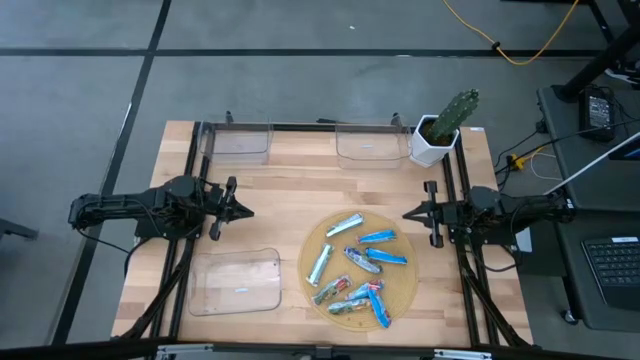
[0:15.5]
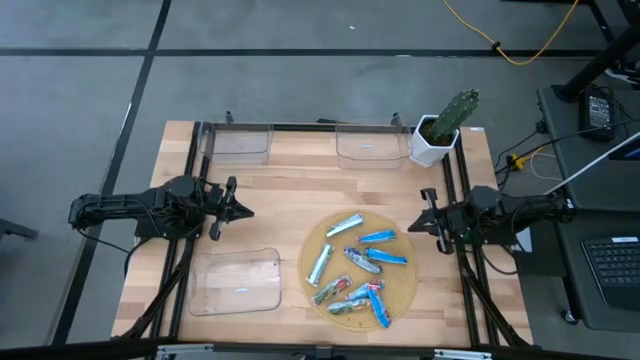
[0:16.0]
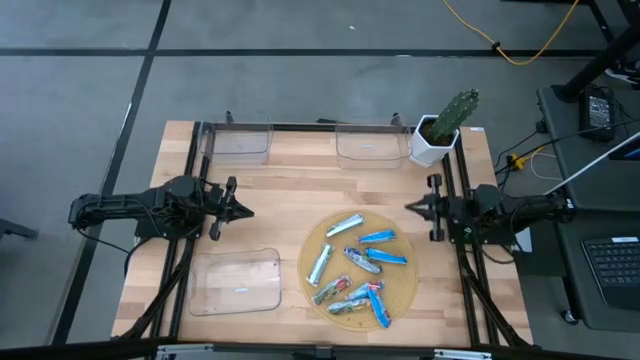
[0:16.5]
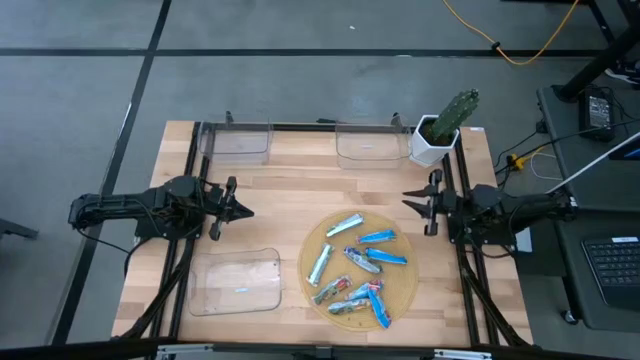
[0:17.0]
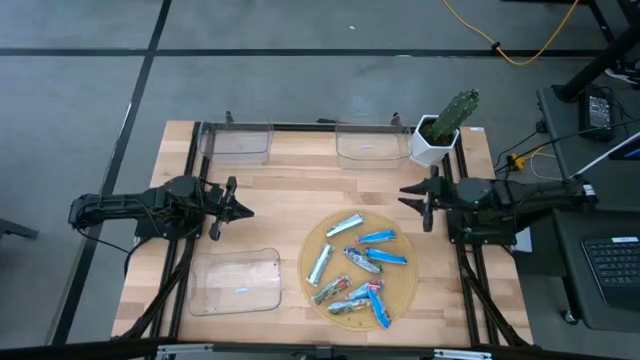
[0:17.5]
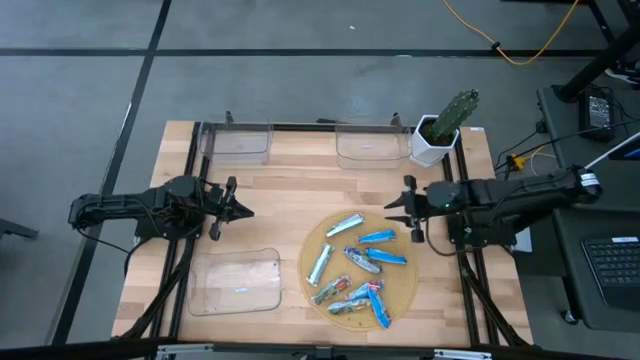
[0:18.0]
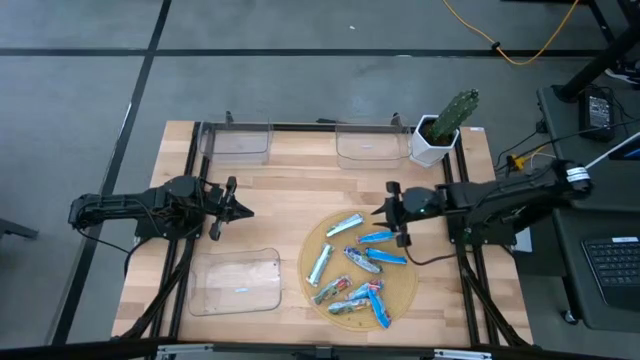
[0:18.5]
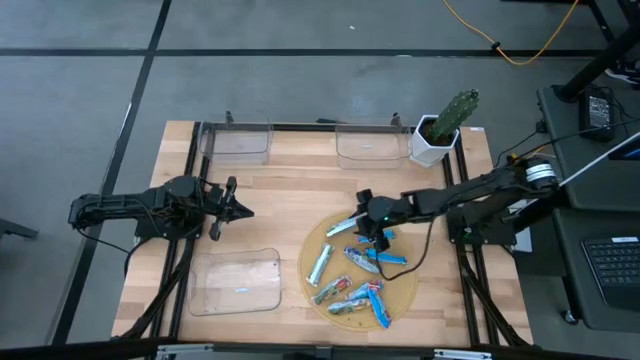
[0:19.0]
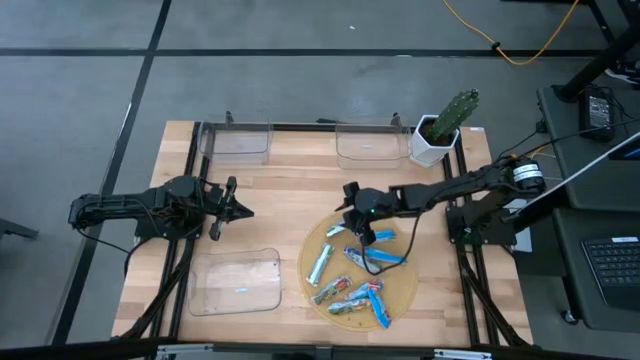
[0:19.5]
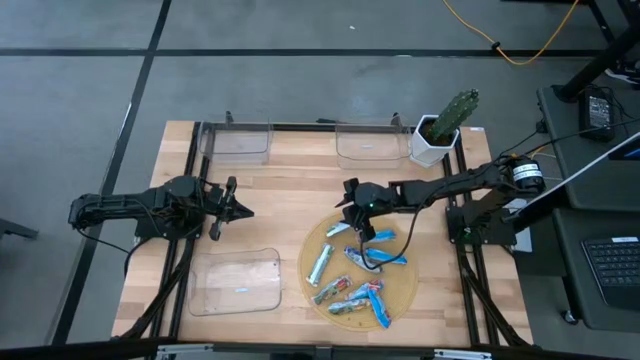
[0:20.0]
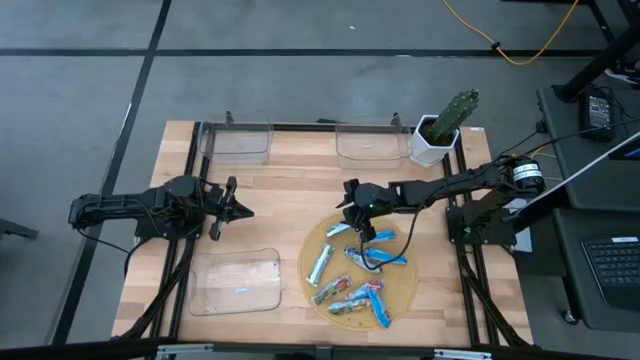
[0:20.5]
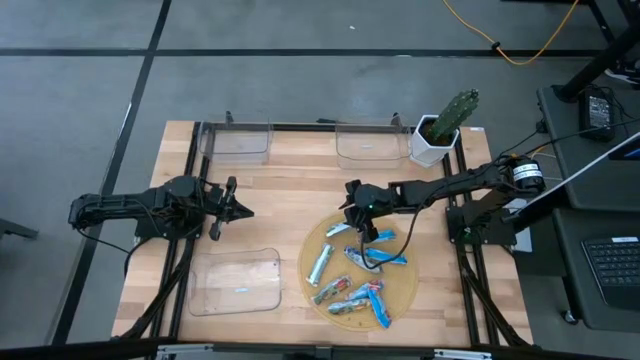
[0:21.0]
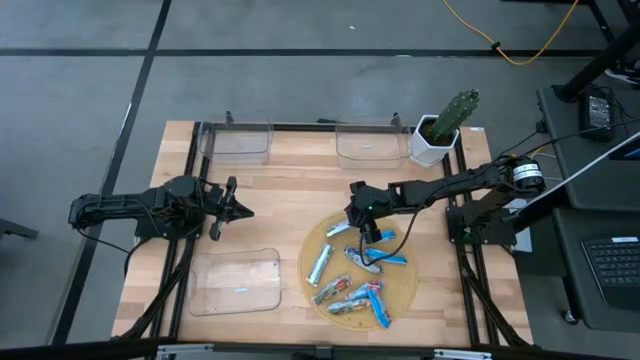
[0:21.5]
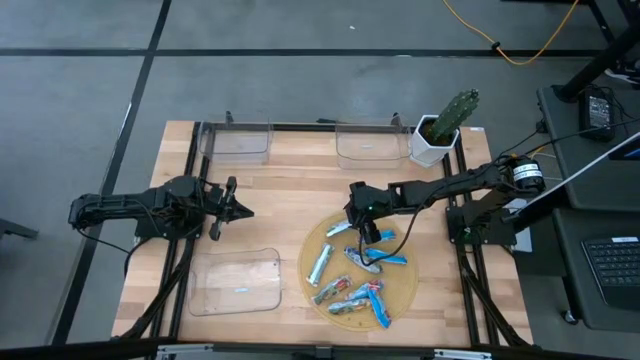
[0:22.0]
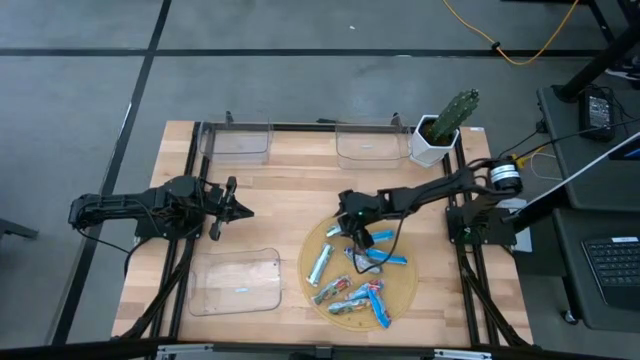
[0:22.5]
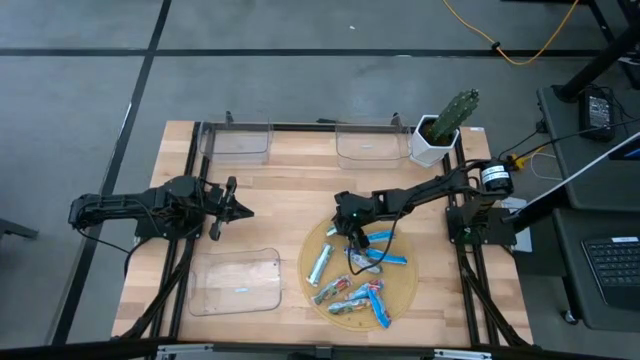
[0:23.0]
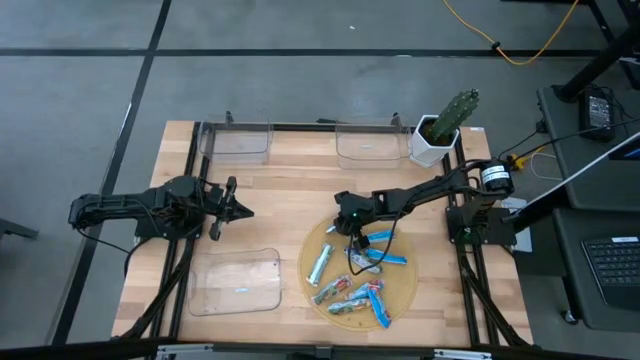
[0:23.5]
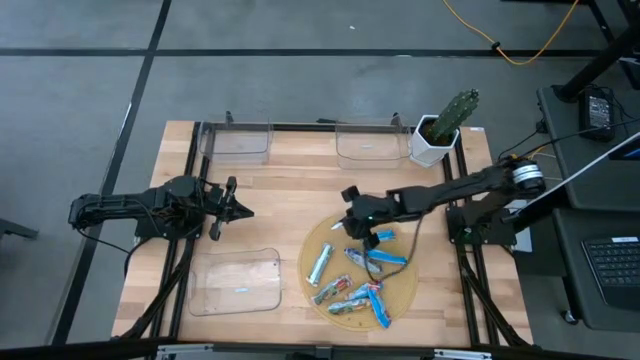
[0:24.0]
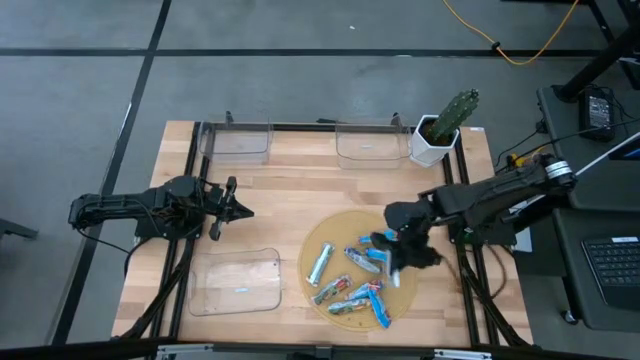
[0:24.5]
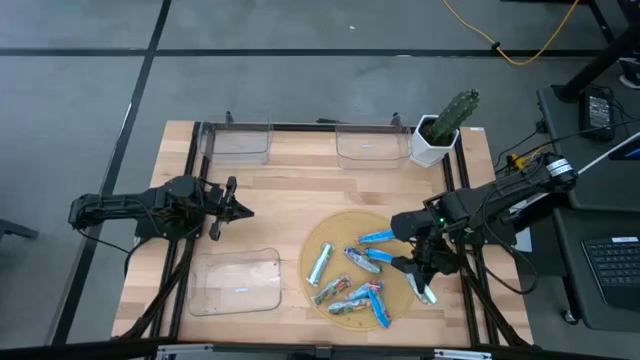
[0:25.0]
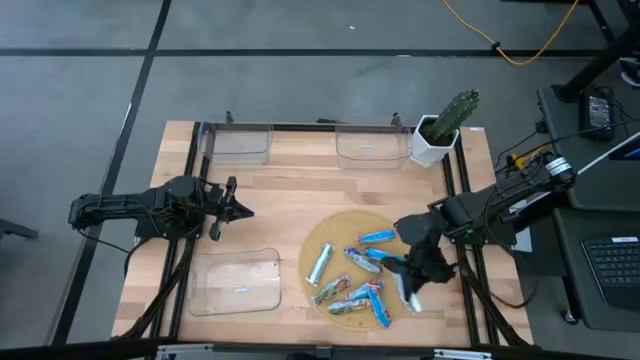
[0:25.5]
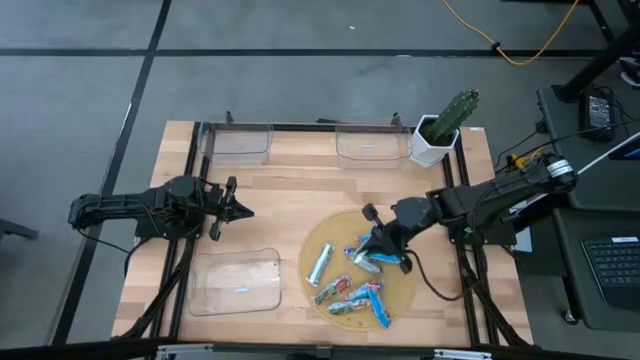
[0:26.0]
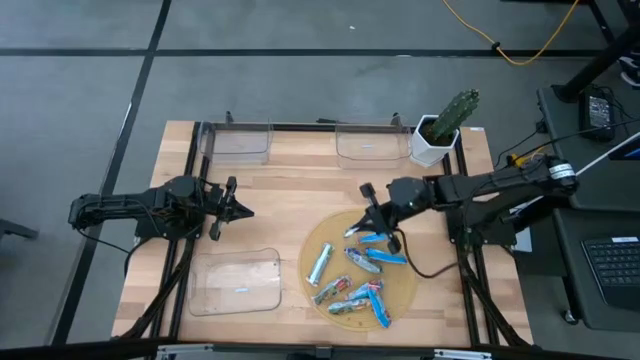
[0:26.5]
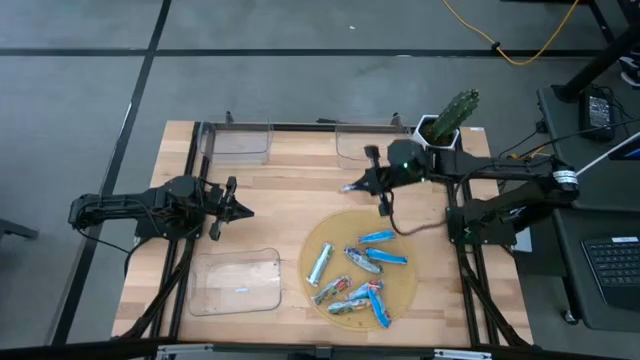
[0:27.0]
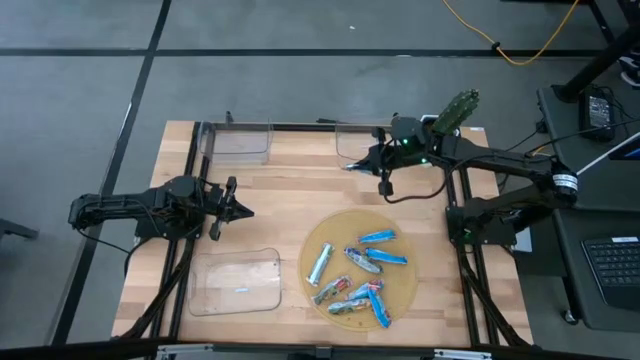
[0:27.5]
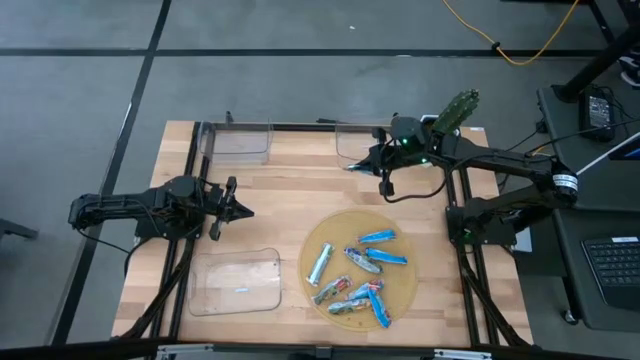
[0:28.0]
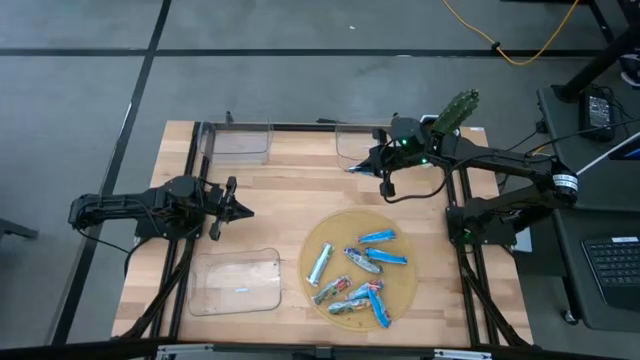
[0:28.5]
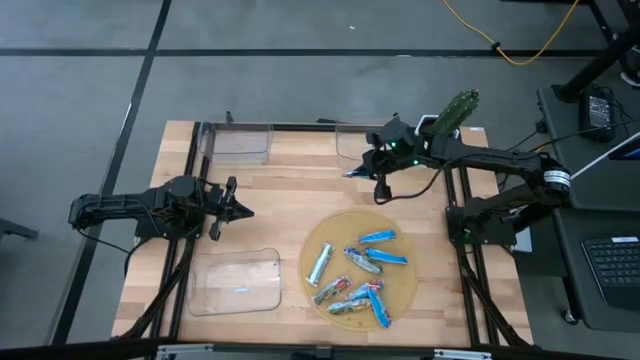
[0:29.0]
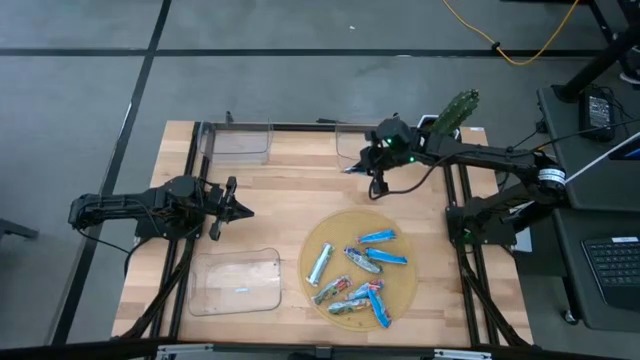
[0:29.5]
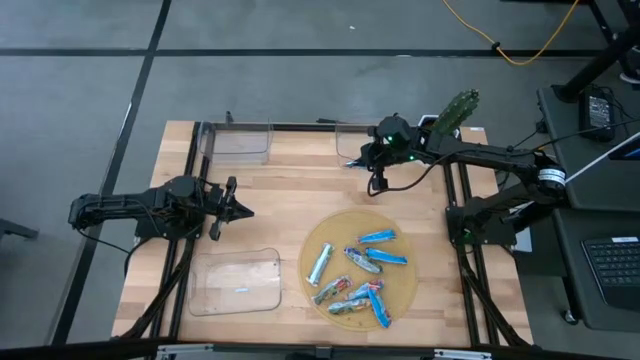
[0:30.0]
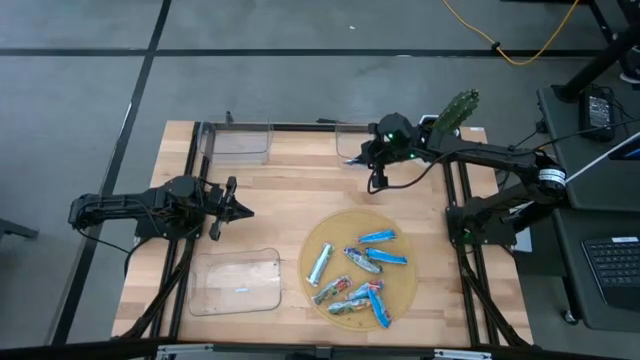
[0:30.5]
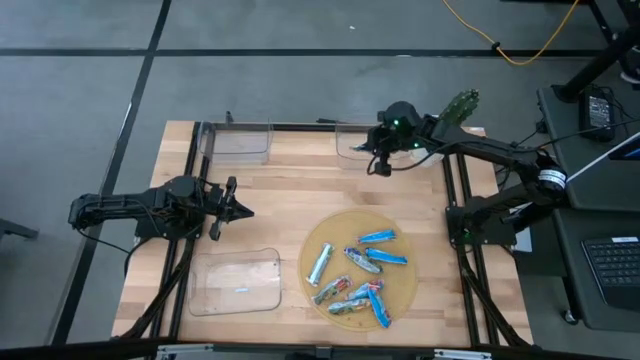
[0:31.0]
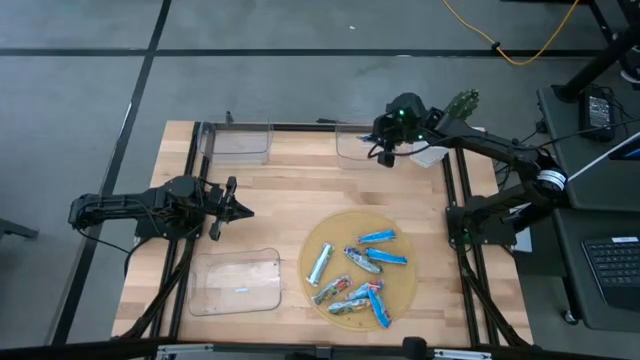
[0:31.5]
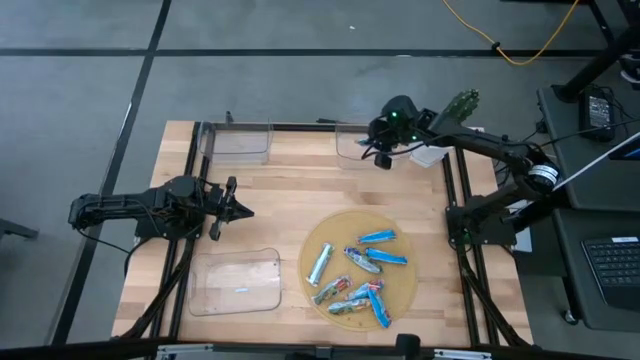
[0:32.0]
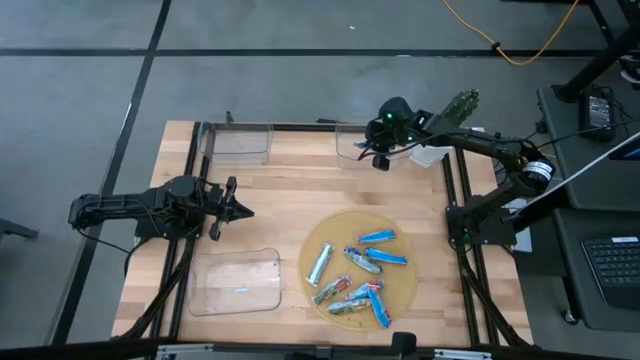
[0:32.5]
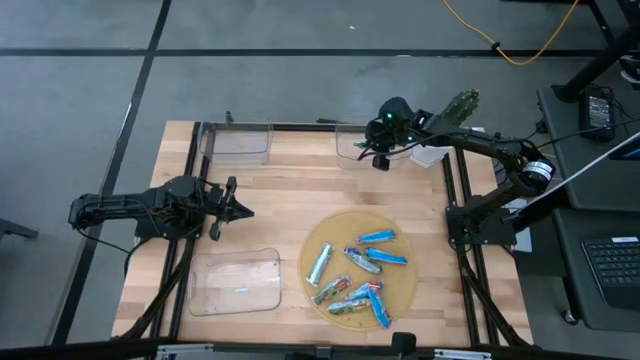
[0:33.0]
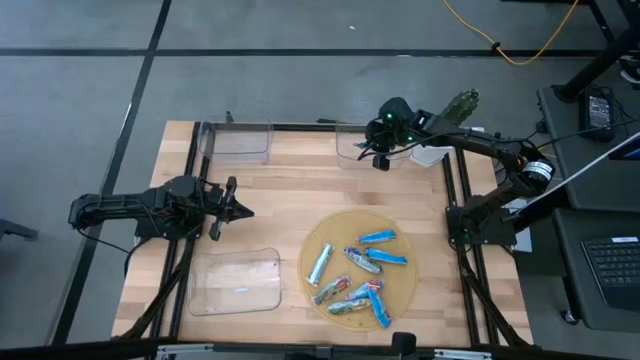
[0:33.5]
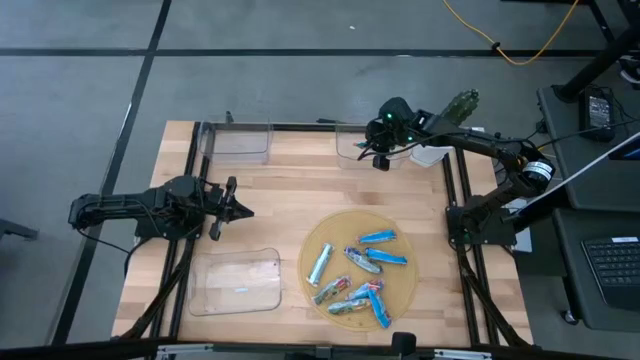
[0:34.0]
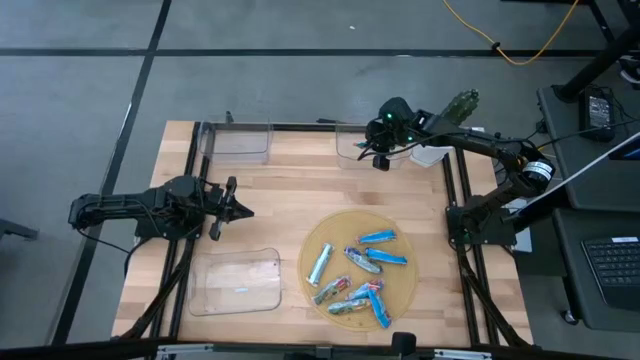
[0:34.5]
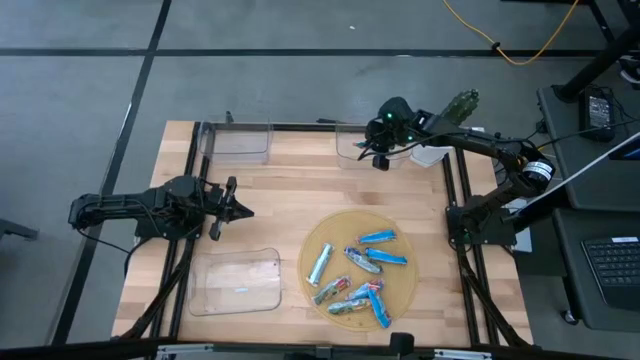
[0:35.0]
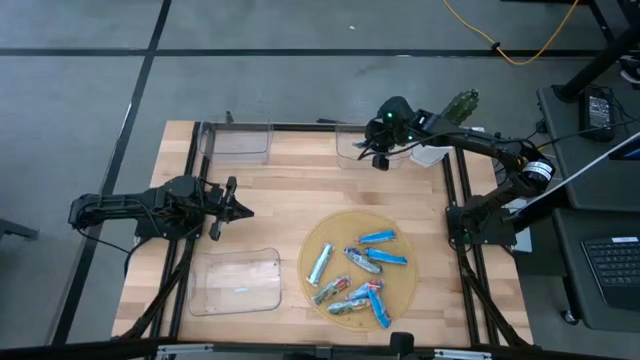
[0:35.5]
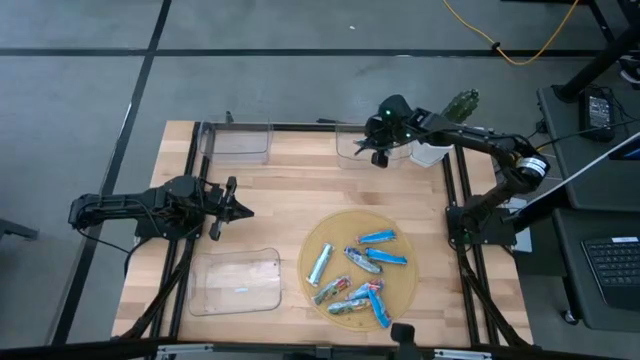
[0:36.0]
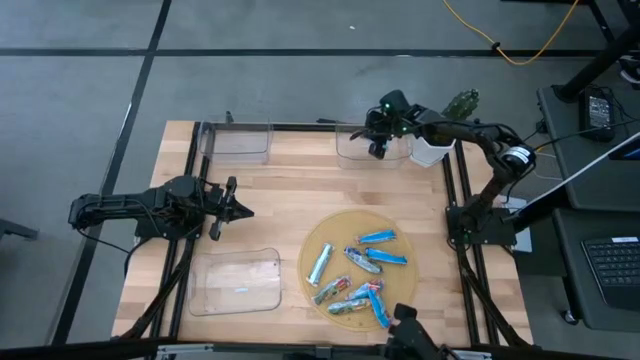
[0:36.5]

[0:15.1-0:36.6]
Task: Pick and place Granola Bars by type
Put the orange granola bar into the top right transparent bin
